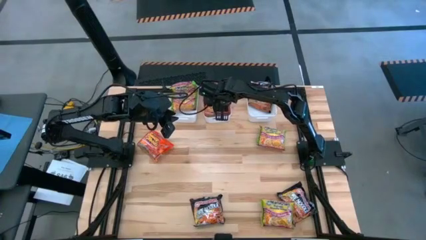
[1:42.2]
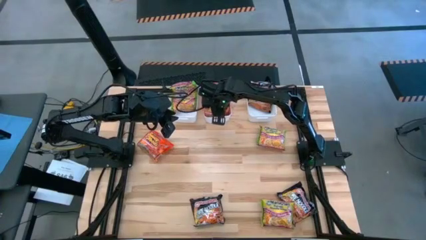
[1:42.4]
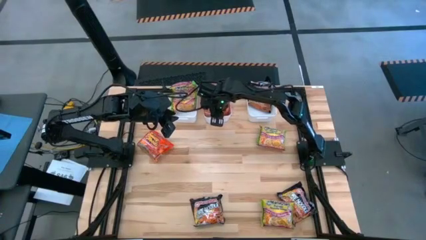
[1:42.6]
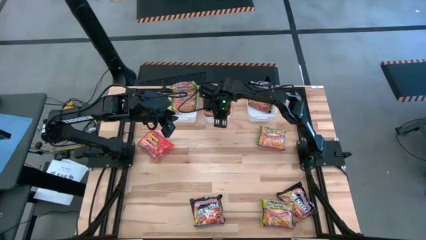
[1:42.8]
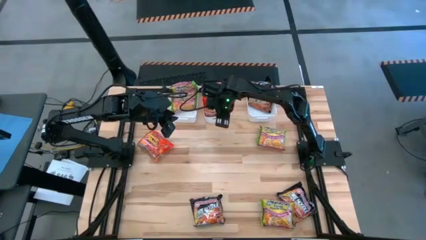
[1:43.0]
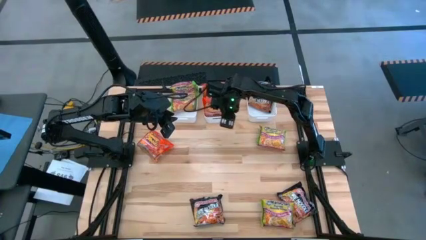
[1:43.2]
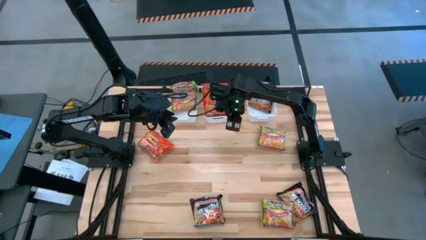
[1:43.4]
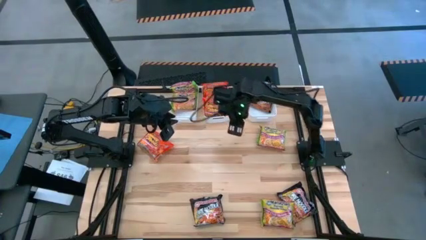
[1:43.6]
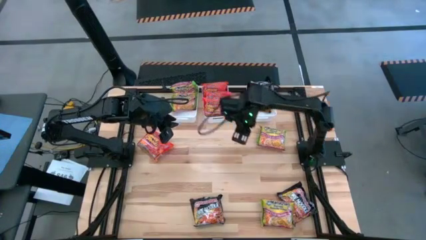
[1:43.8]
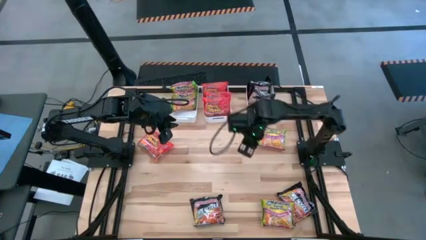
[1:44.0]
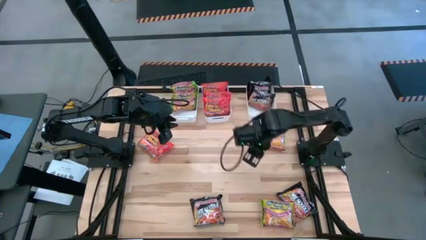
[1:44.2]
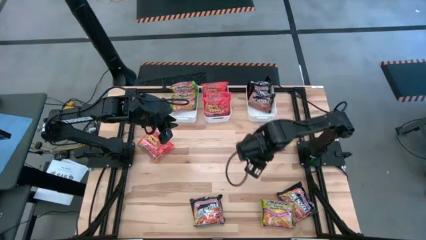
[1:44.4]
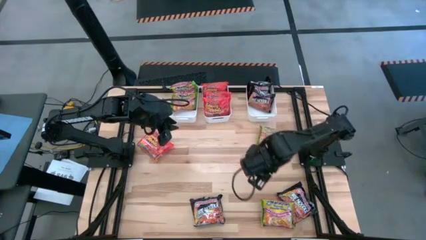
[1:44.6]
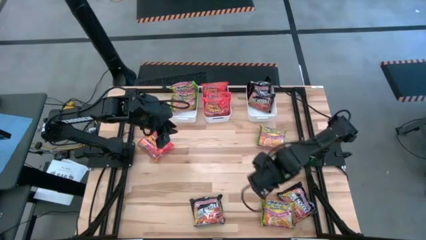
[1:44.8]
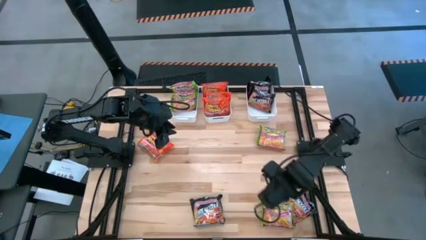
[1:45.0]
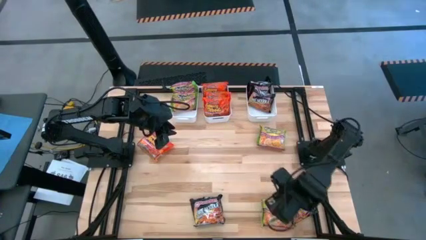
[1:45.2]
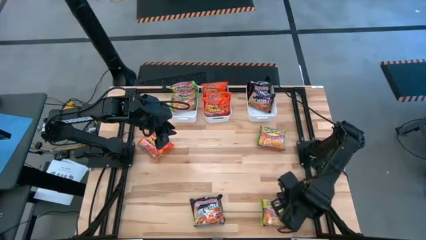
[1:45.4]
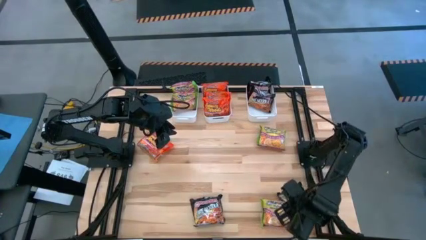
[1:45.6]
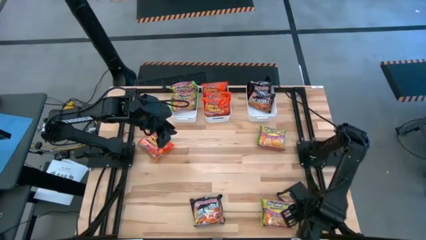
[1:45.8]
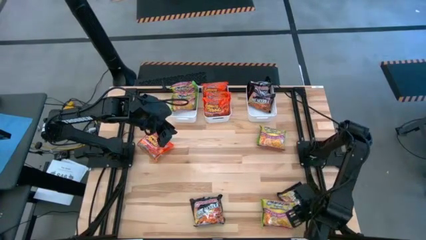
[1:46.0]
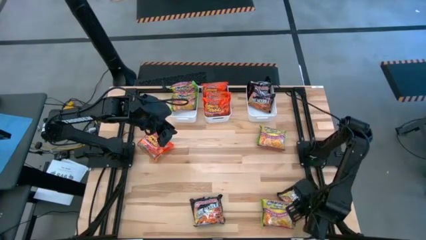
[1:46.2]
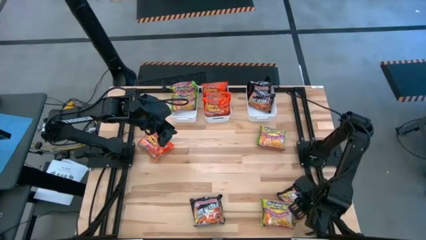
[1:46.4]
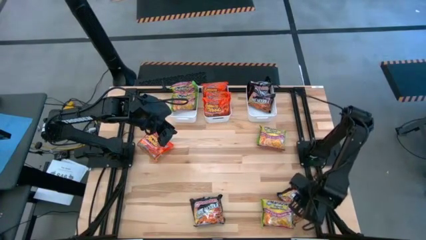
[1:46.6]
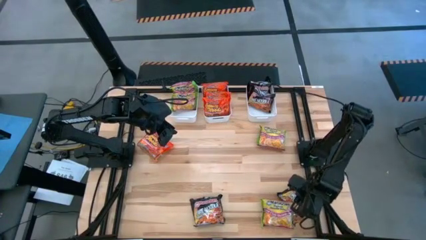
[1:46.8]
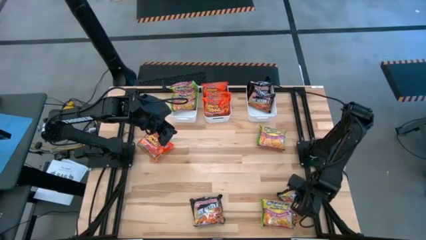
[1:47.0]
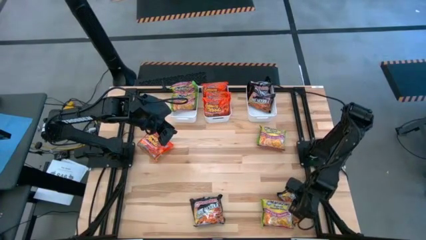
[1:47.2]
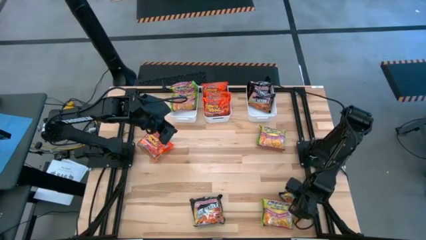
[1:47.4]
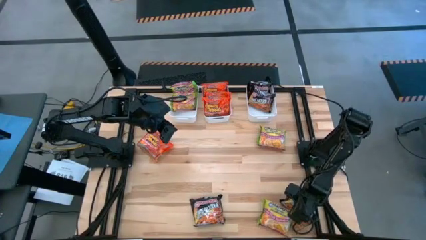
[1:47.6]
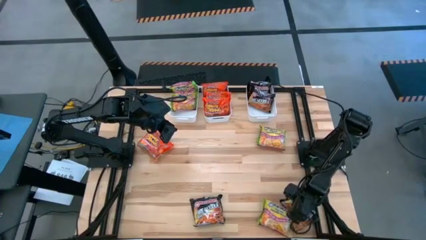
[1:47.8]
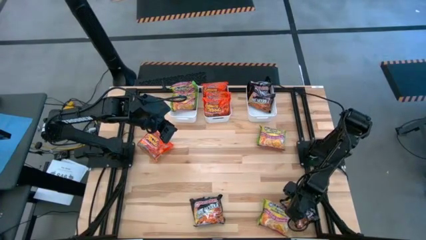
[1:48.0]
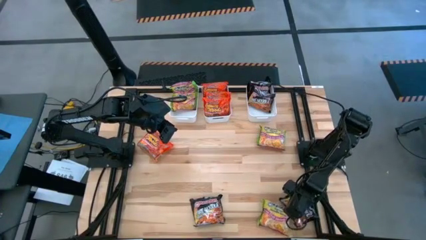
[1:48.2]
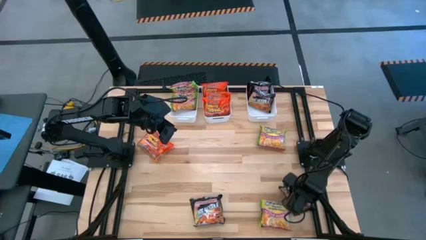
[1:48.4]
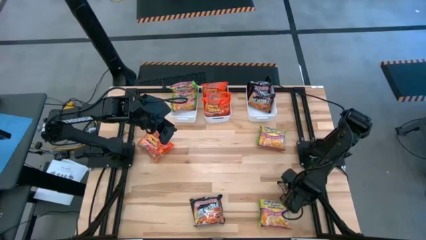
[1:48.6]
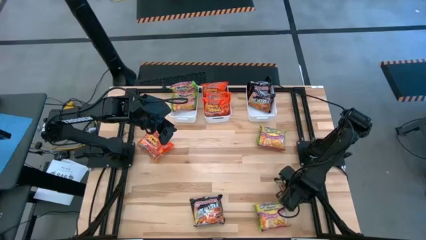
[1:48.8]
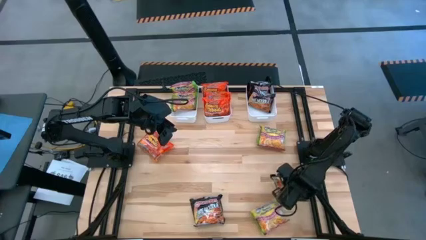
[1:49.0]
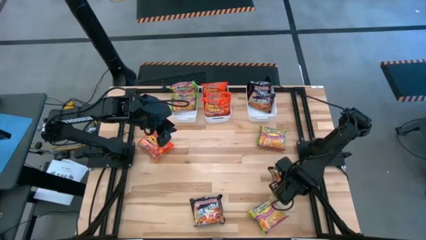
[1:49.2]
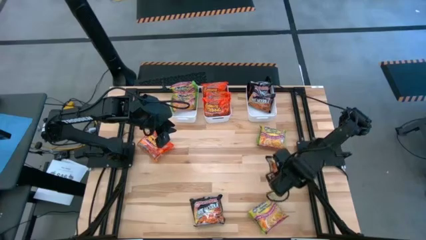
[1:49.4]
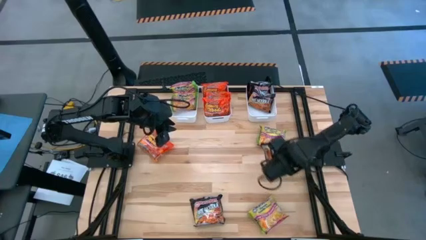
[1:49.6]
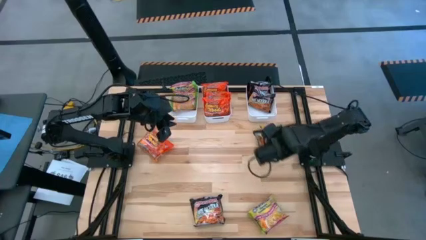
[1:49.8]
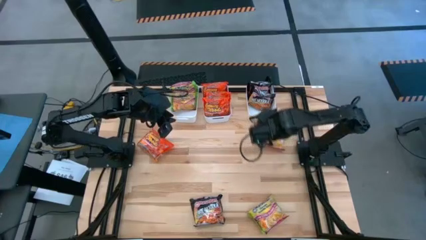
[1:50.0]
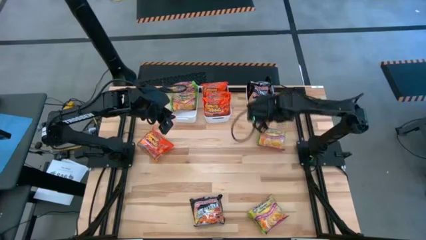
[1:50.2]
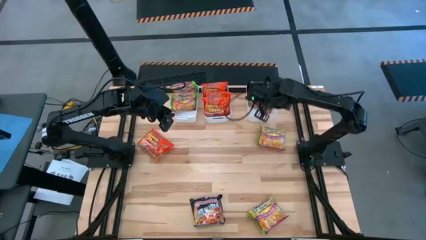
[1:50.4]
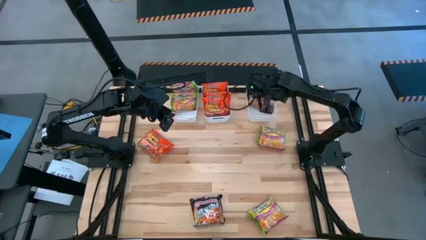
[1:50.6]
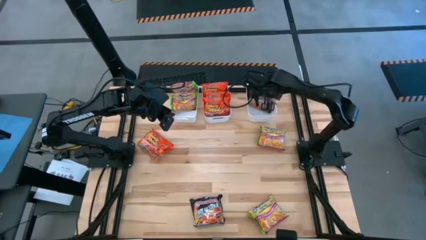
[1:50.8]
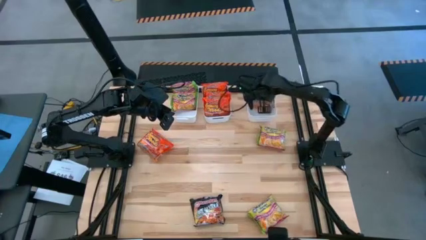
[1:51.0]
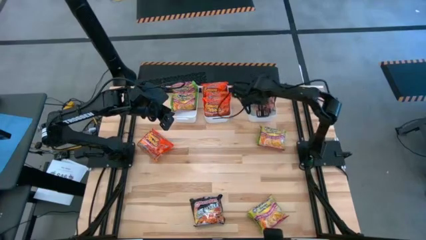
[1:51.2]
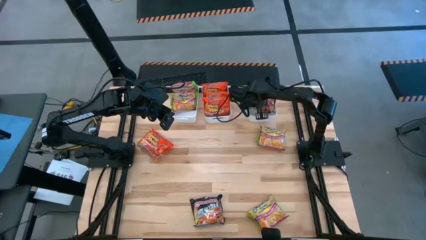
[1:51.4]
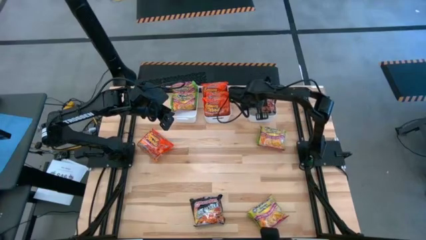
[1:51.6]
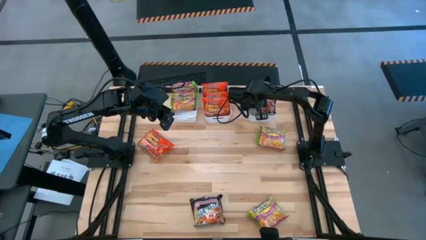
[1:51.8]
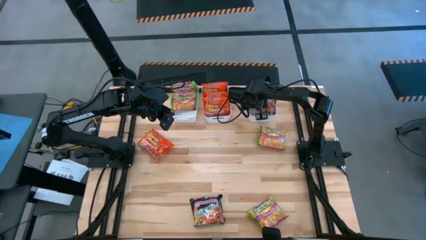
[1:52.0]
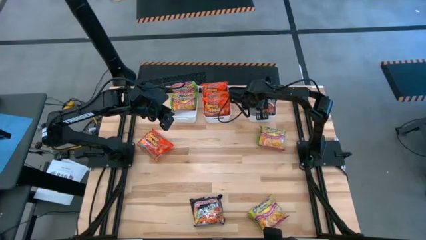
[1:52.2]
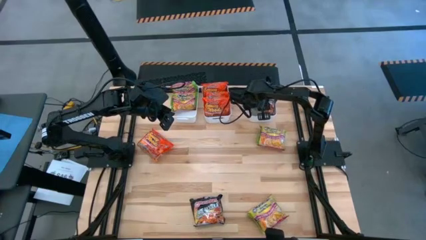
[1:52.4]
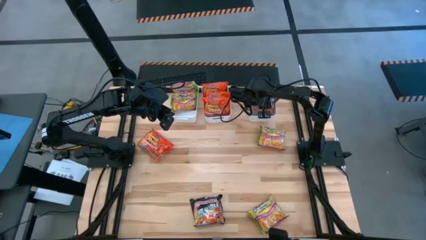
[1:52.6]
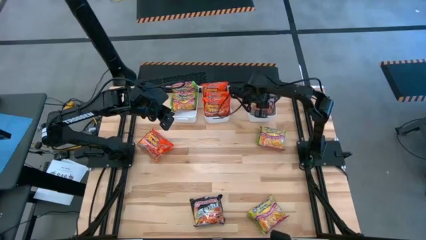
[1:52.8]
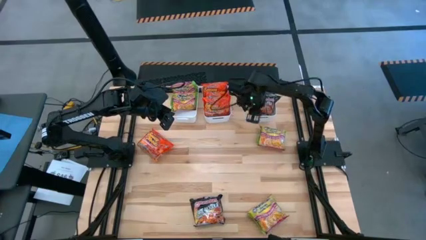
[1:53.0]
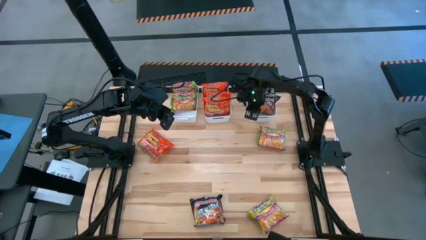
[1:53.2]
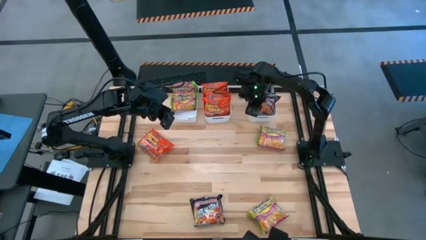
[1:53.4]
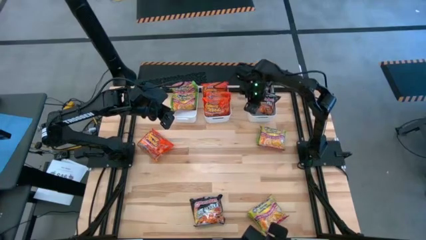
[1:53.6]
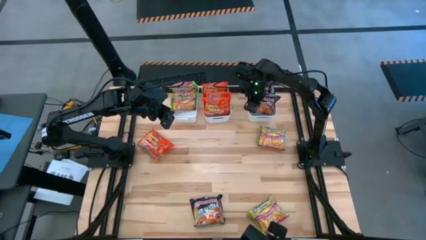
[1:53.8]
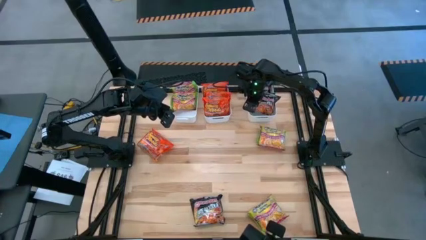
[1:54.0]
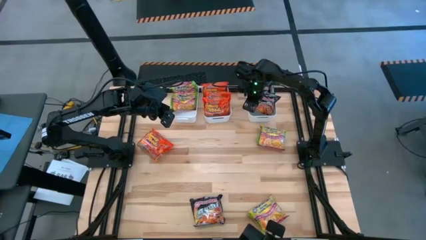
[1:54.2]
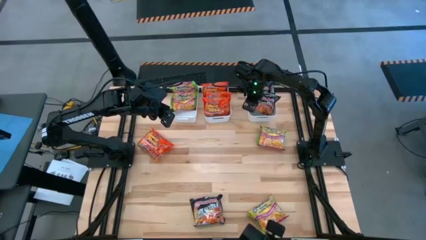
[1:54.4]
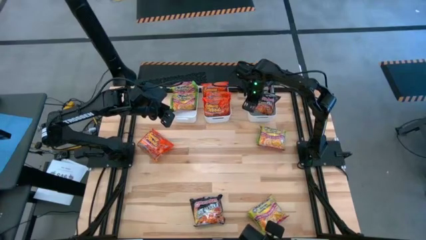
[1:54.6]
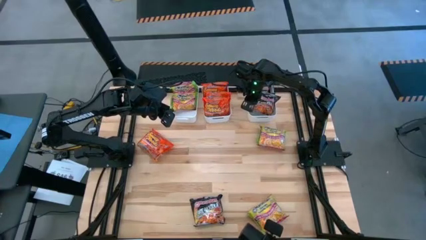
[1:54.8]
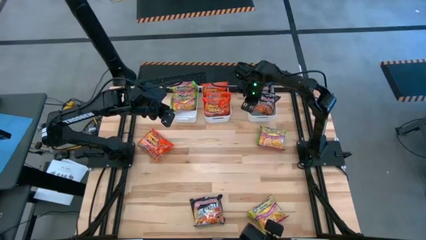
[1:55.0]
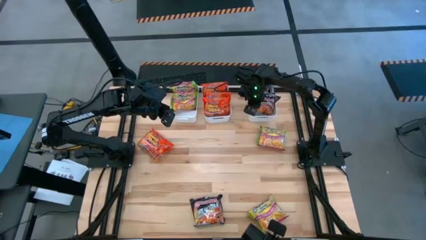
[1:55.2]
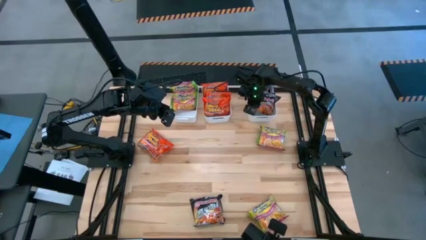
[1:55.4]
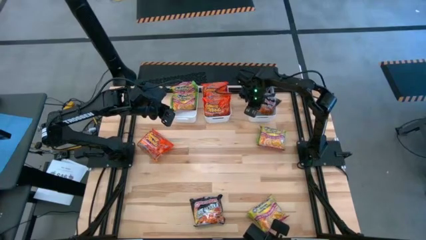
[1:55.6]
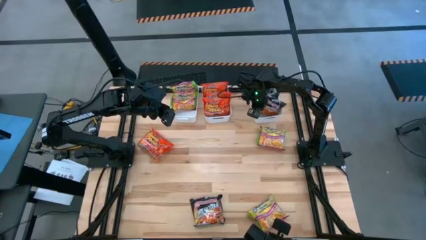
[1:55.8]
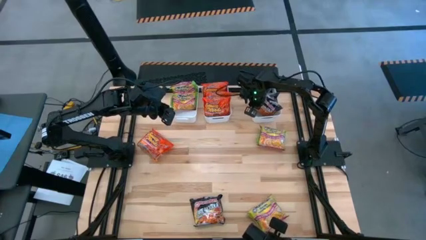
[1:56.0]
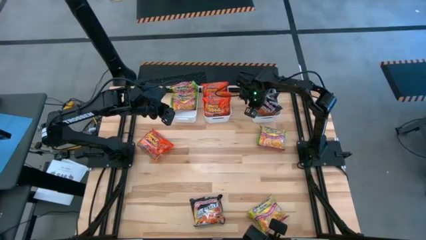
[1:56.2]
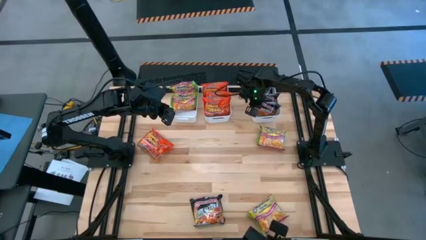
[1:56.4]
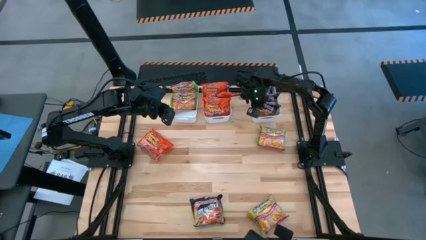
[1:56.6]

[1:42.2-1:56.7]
Task: Sort Maruchan noodles
Put the black noodle pack into the right white bin

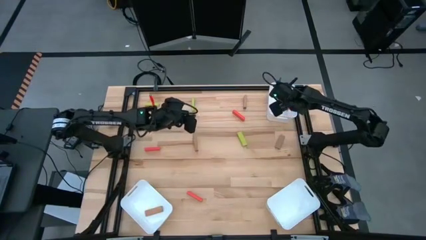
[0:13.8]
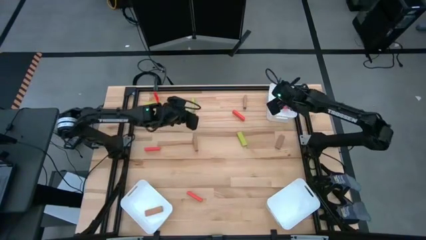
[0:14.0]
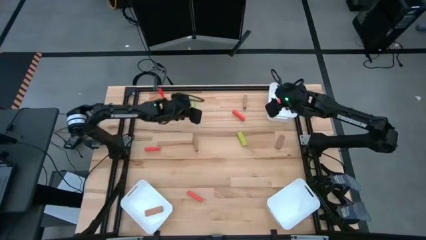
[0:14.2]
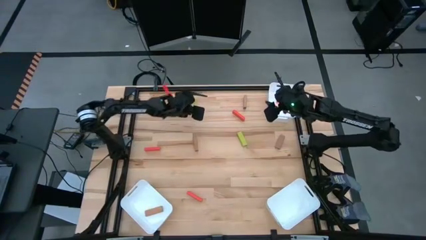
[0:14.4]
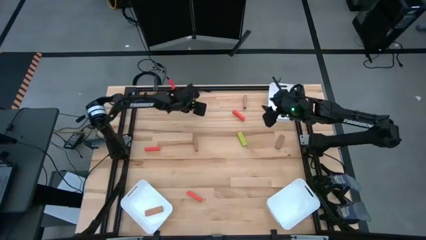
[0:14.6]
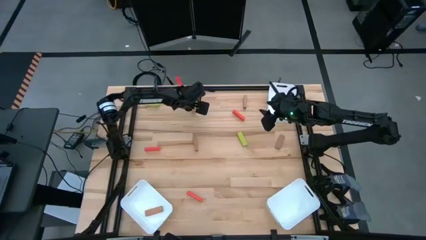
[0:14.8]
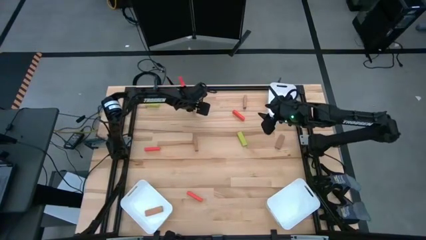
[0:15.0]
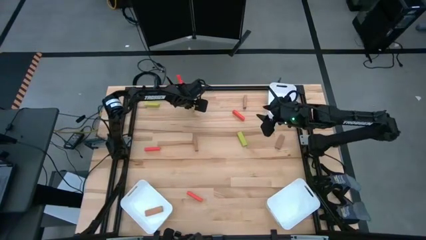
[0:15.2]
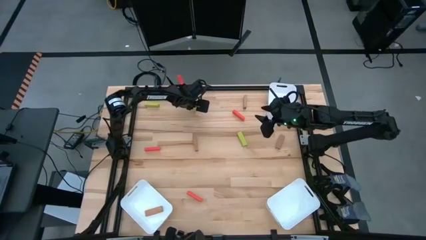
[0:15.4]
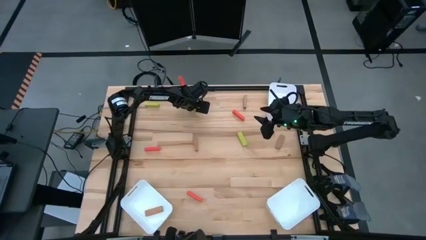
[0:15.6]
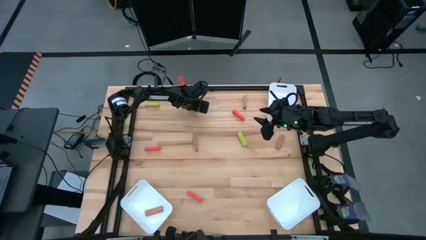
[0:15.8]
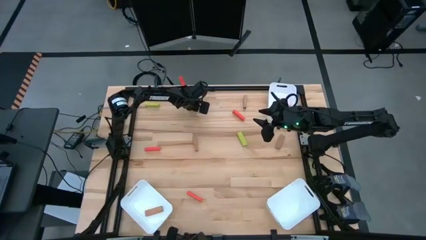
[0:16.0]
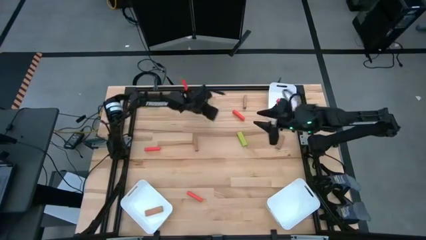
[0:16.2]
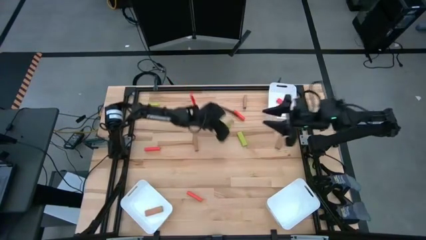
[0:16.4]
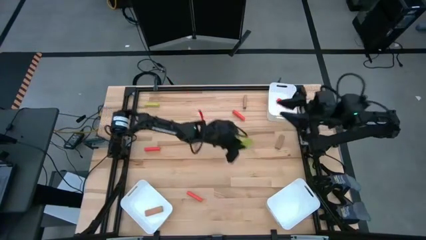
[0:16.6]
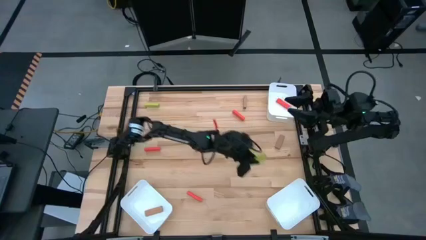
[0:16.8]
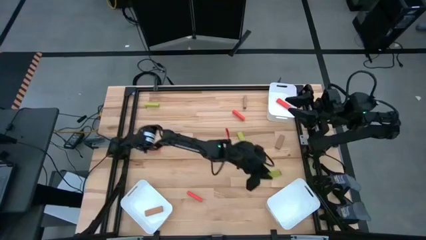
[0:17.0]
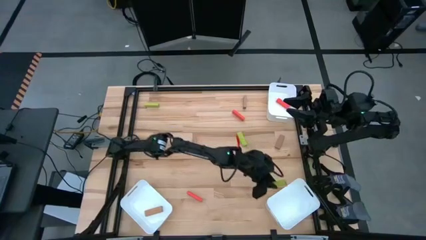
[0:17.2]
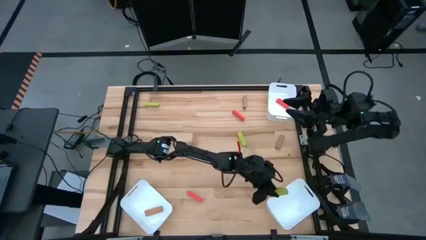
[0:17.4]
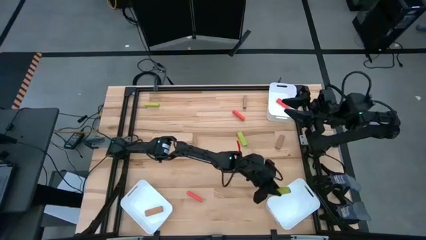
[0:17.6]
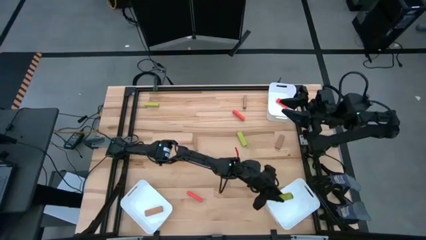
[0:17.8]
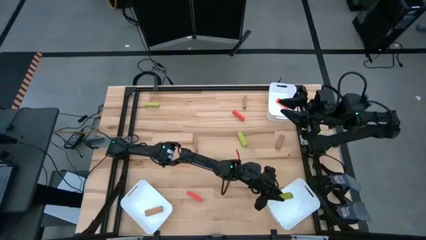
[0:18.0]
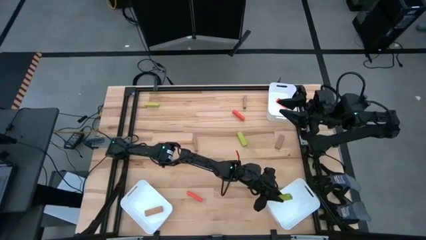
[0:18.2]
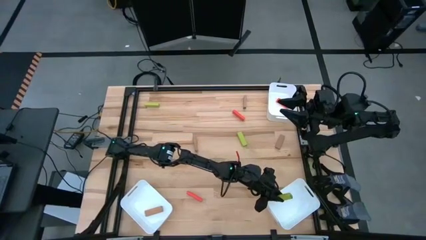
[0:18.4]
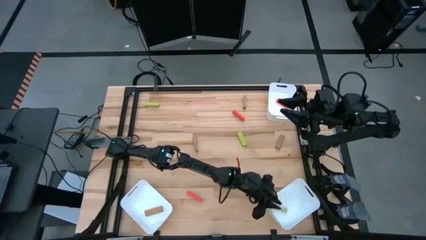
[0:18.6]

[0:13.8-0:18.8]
Task: Sort blocks
Put the middle green block into the bottom right bin
